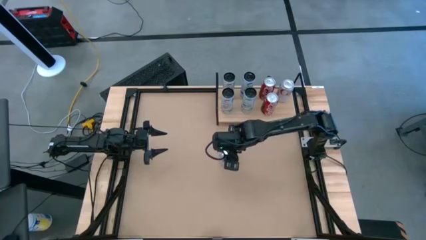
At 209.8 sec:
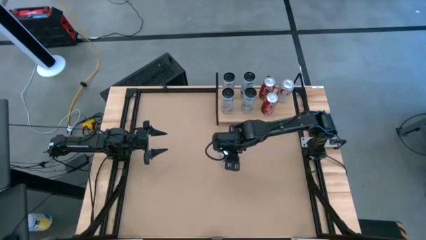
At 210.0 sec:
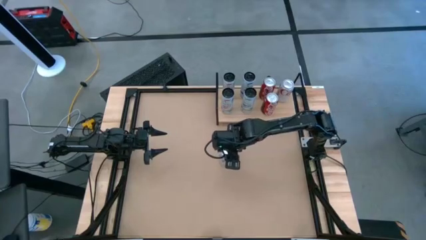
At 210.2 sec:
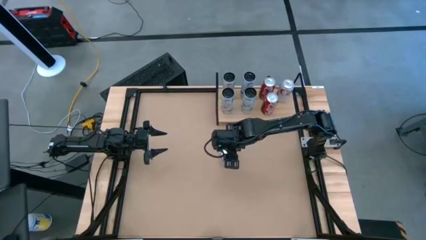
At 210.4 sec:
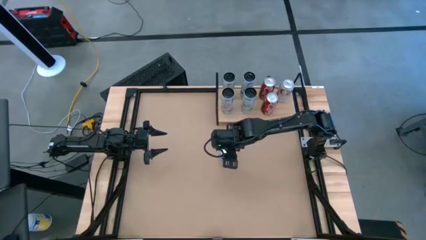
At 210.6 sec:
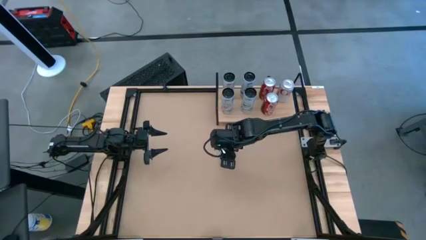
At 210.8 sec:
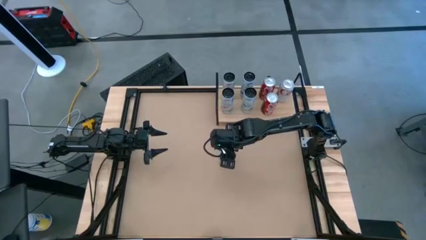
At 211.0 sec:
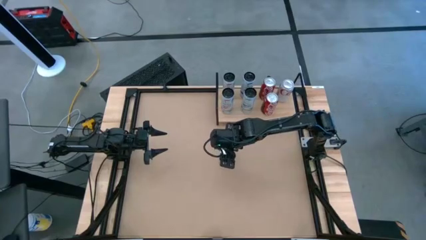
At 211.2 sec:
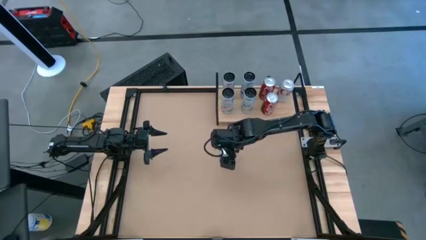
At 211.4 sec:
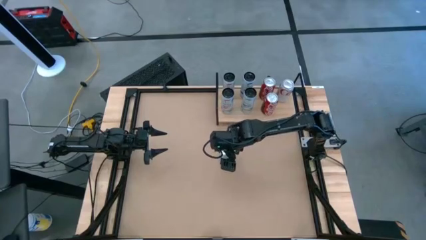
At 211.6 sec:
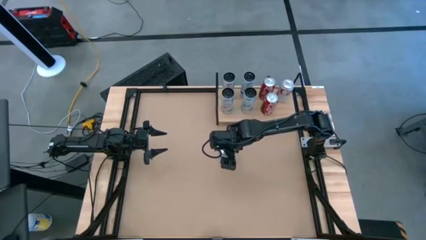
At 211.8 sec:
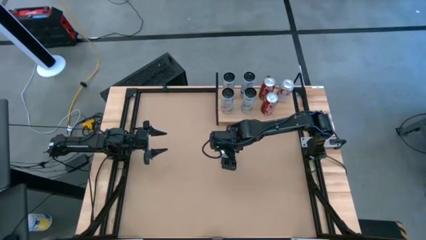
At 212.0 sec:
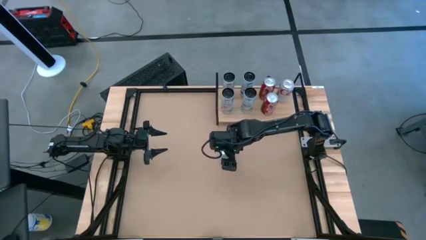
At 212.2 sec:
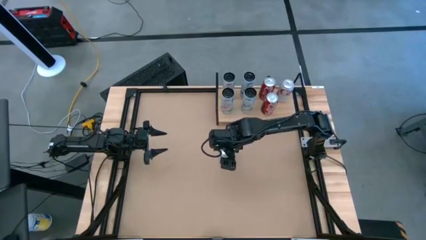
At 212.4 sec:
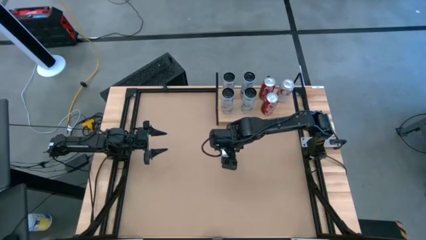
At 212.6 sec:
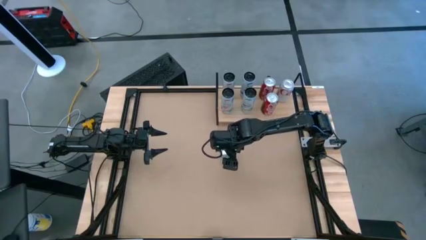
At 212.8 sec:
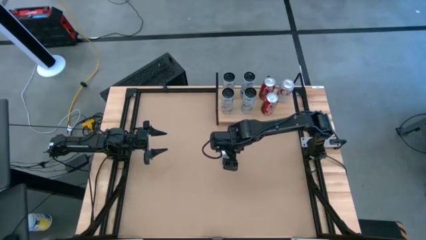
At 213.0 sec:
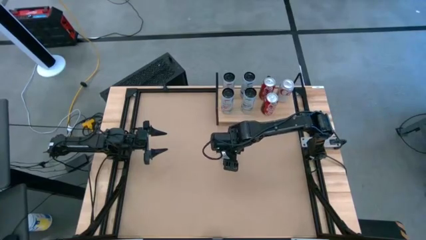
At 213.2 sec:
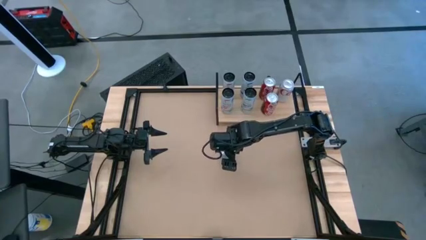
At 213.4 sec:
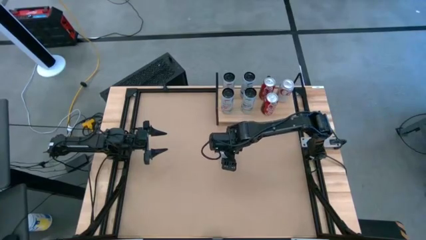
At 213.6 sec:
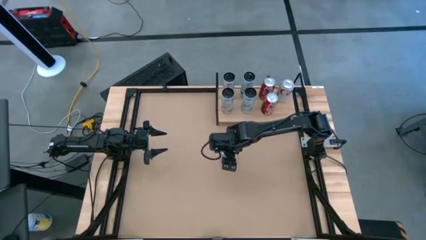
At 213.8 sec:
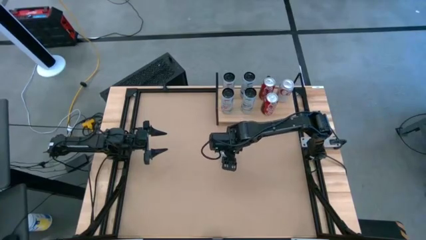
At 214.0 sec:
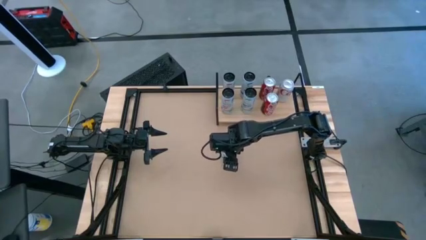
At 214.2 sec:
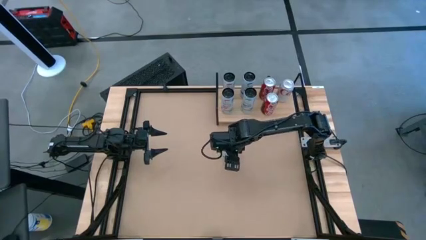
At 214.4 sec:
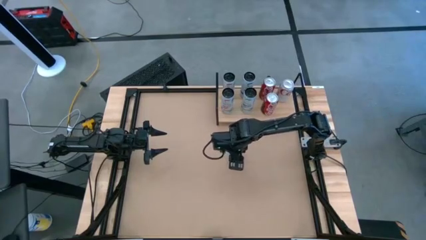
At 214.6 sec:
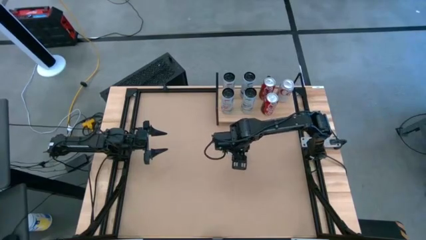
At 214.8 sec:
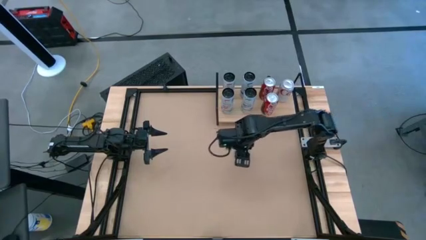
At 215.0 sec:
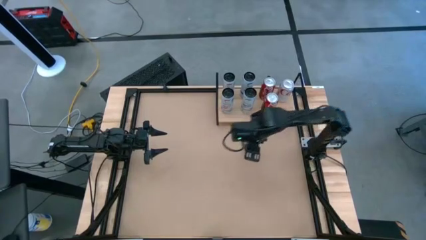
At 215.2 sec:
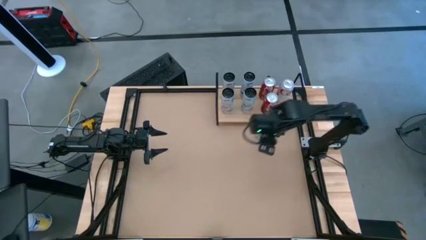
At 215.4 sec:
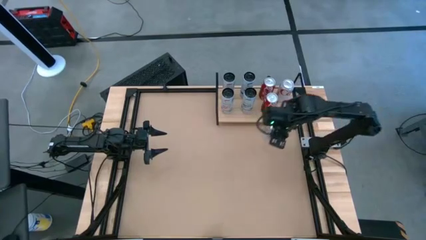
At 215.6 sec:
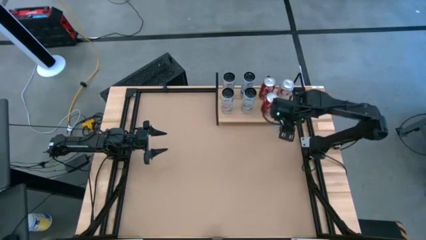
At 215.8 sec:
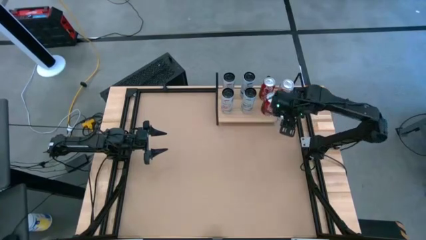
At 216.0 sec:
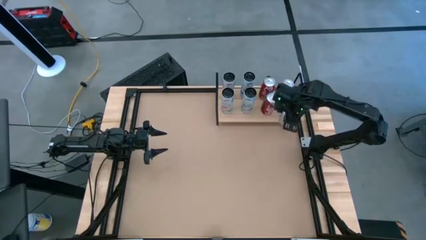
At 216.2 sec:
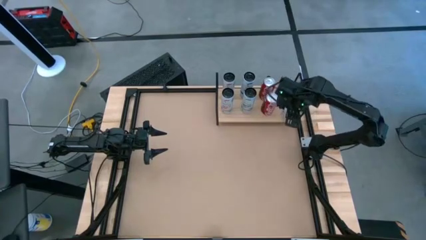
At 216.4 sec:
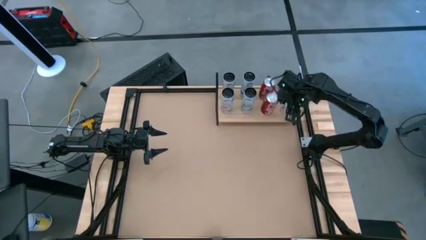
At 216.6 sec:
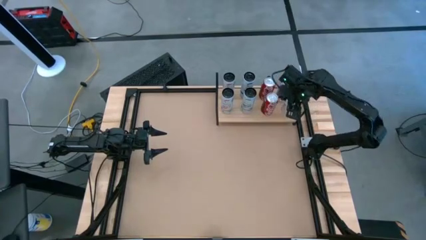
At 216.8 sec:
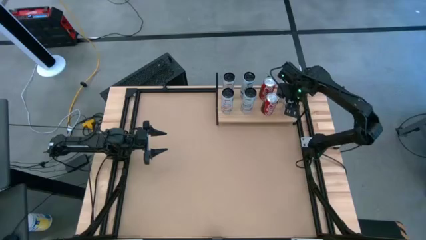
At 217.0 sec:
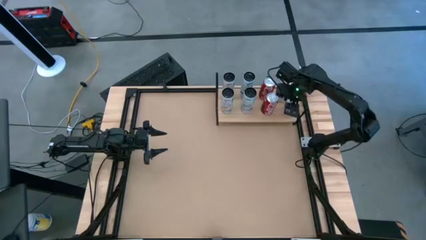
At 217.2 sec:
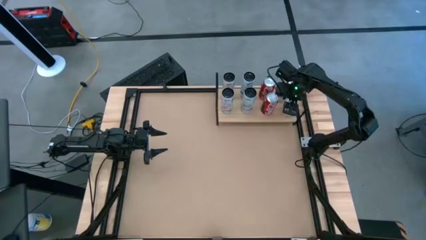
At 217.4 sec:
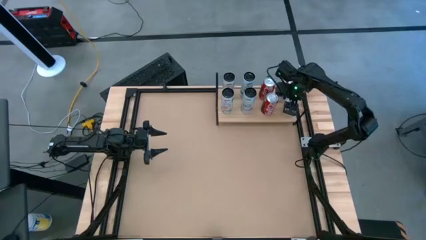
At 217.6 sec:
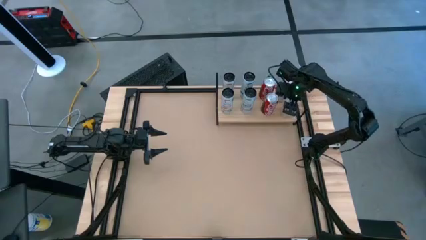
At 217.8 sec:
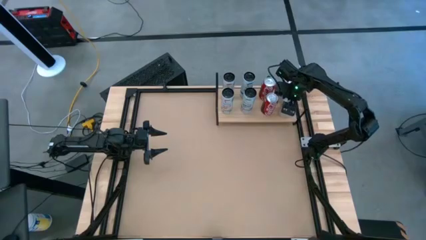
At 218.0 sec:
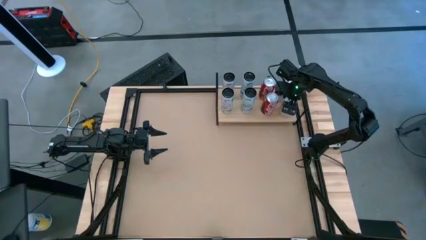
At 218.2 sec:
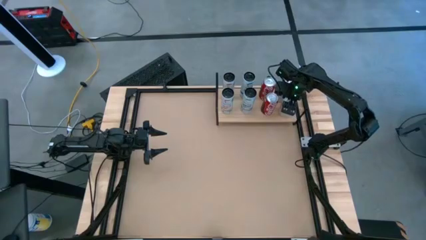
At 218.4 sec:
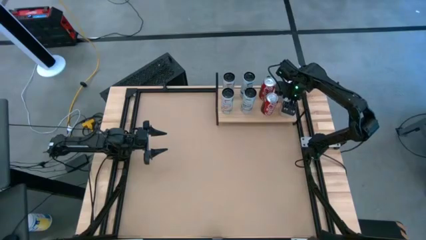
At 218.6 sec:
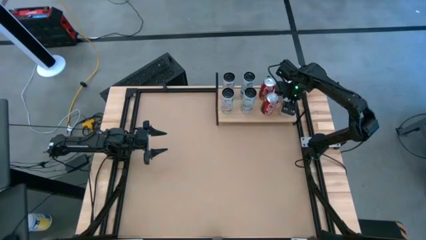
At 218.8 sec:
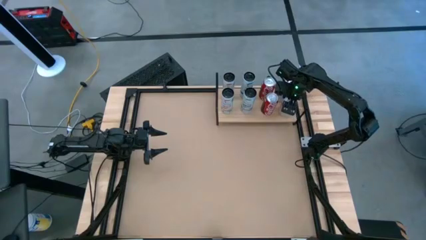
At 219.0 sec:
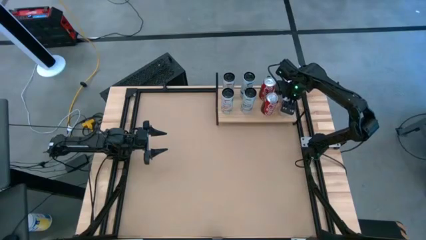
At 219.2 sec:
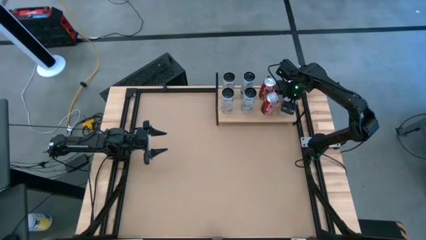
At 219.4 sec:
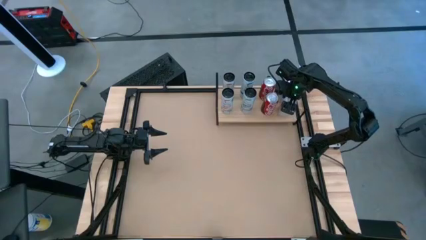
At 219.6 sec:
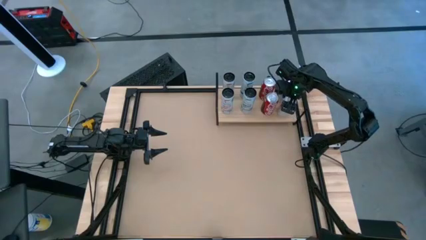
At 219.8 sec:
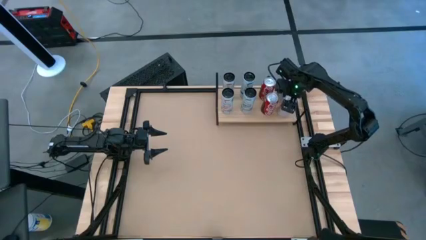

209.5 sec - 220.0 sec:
Task: Place canned beverage on shelf
Put the silver soda can on the shelf align with the other silver soda can

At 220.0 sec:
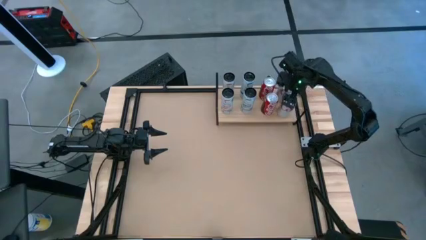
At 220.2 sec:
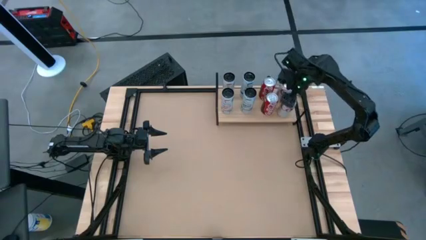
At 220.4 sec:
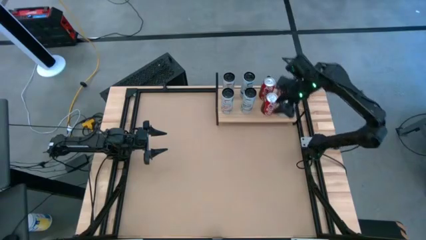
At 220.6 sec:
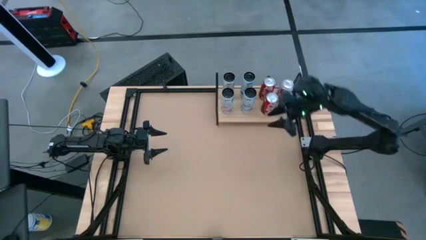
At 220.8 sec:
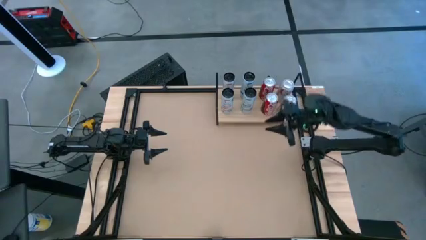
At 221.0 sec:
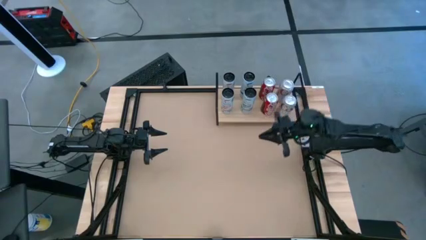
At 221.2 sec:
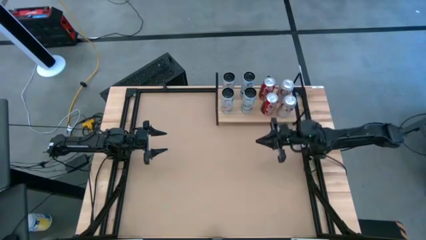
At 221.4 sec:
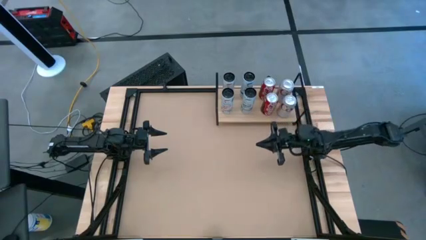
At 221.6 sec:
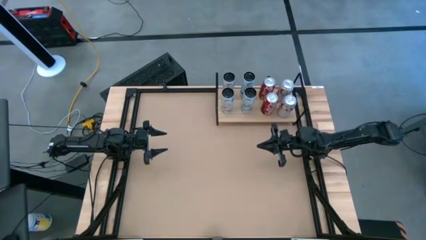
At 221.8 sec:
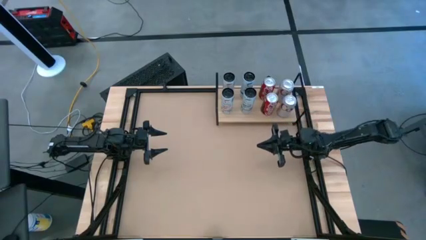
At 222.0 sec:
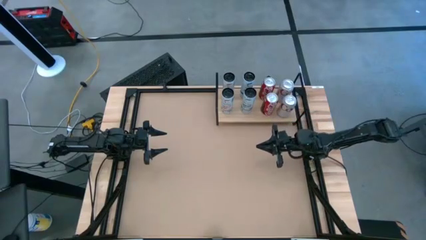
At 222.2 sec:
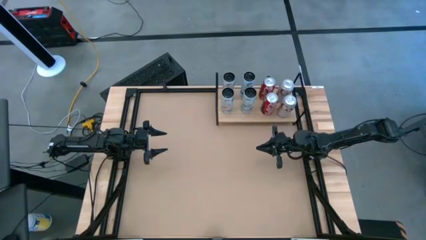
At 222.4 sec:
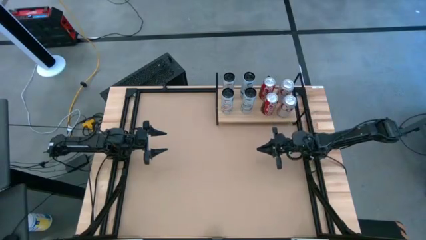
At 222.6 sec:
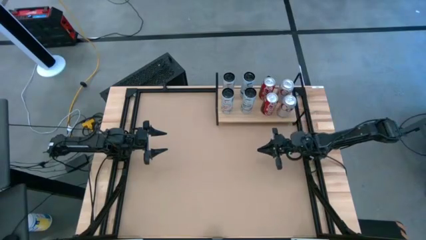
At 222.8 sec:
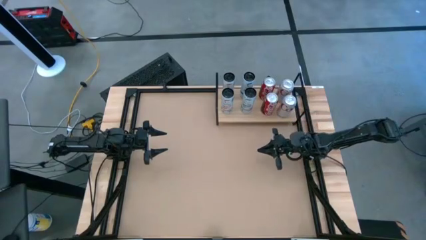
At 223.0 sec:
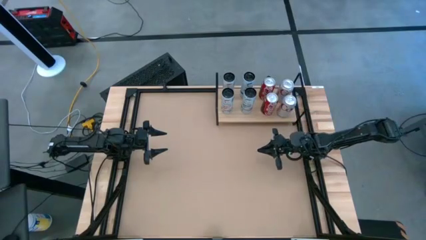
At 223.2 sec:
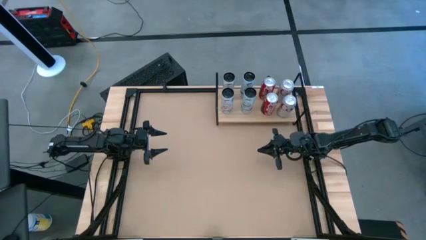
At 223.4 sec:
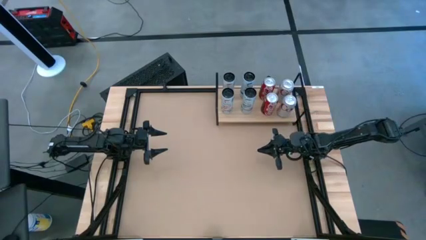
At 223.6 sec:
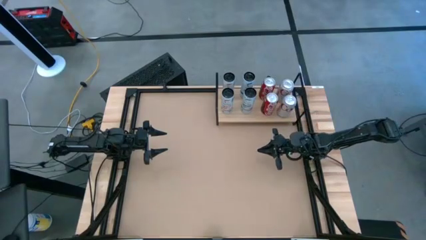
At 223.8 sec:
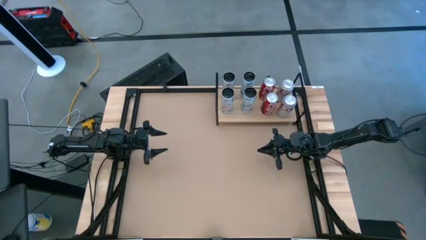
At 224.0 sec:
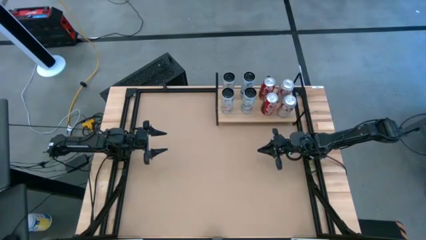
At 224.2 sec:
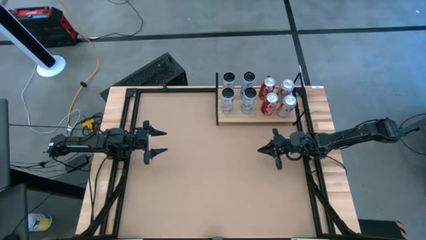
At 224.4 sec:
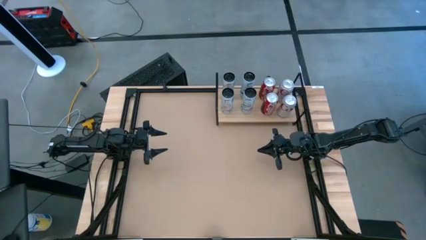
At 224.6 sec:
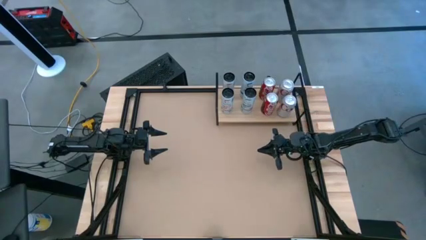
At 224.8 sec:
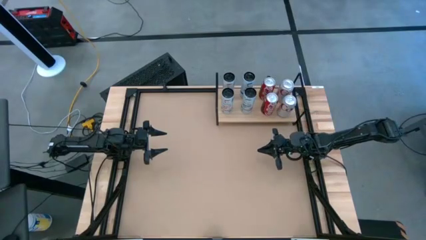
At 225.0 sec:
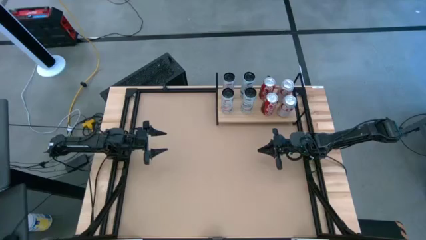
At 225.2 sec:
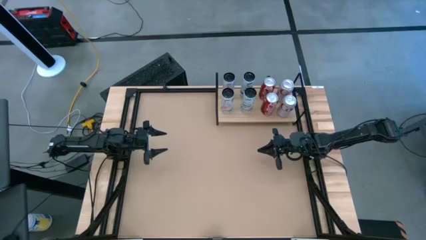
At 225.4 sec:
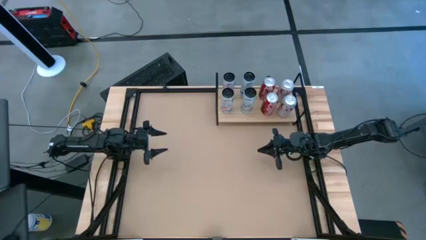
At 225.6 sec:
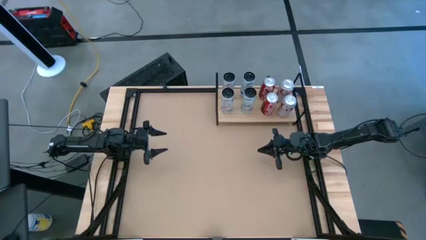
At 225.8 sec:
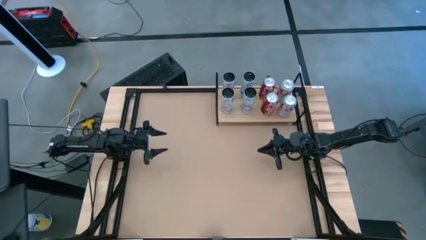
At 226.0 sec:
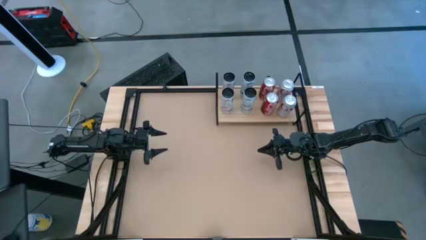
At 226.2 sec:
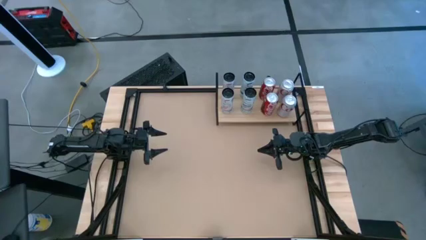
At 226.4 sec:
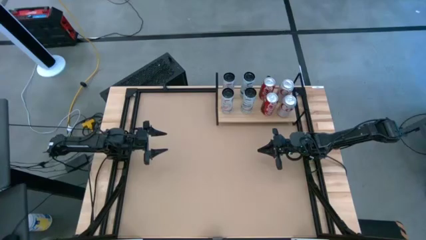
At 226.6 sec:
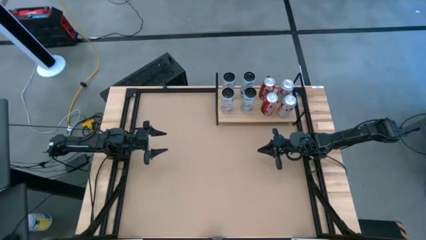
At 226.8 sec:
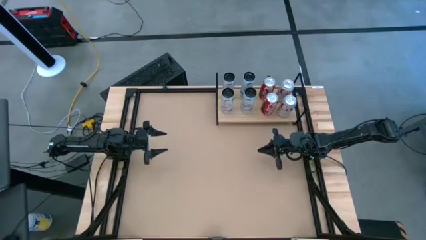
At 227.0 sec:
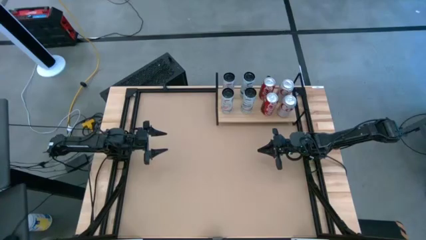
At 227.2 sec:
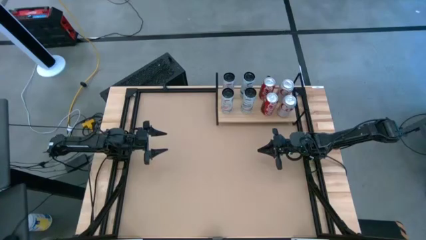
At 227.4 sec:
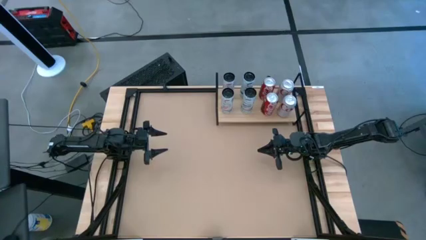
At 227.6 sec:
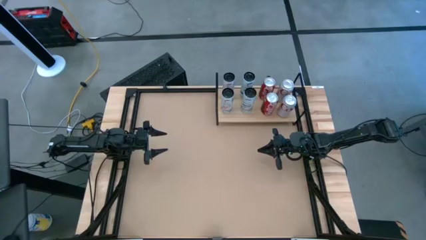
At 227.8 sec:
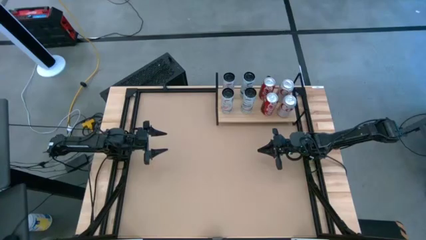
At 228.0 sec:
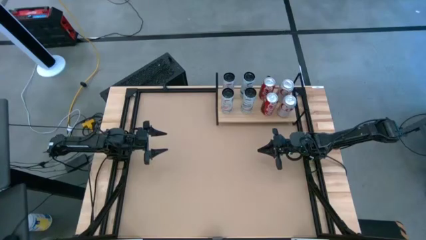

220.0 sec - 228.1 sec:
Return to Home Position
